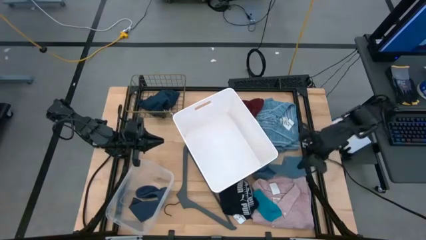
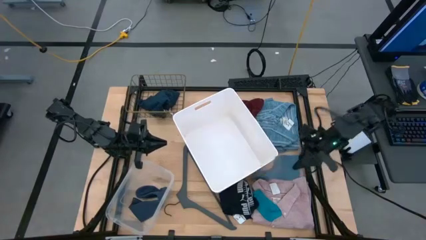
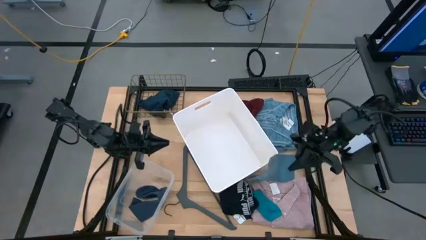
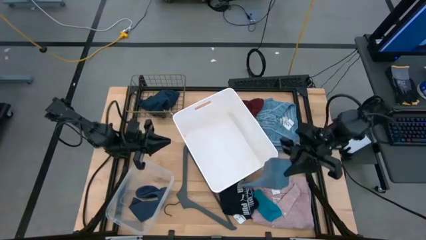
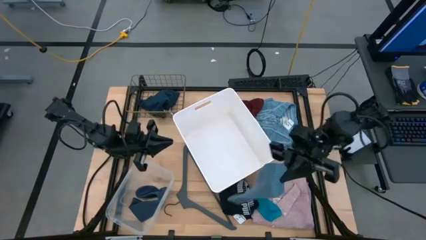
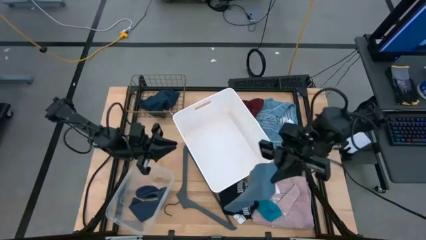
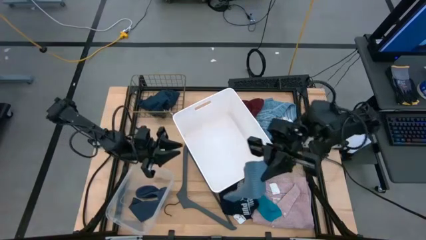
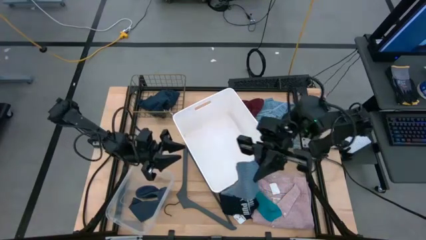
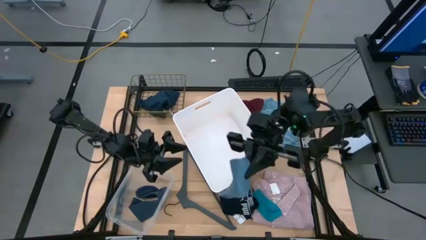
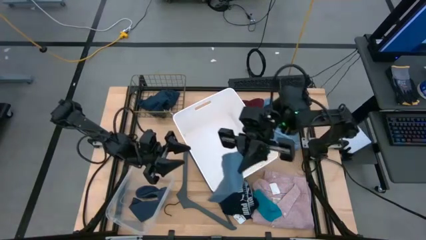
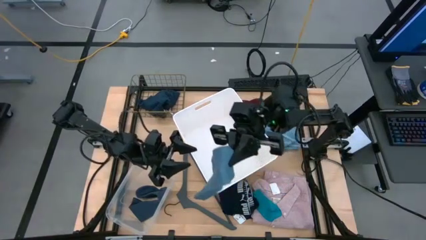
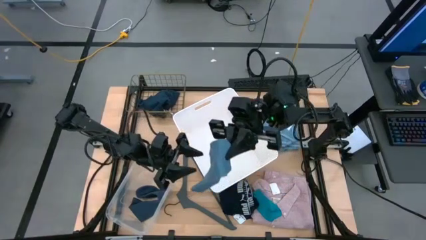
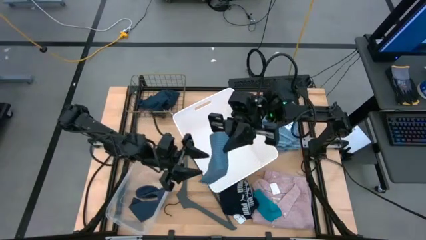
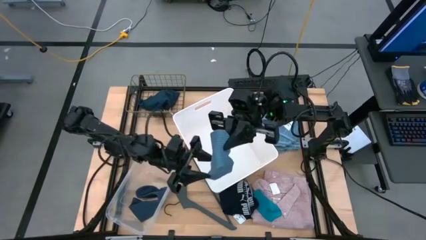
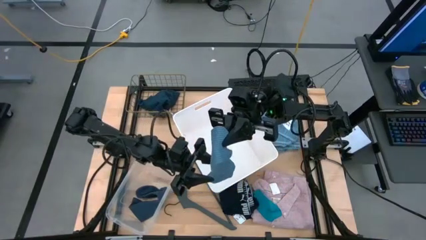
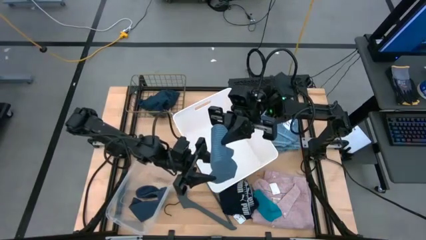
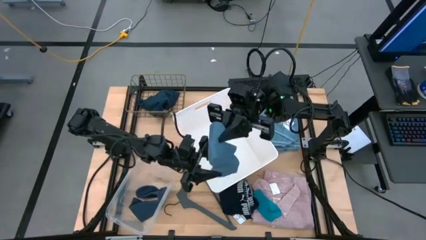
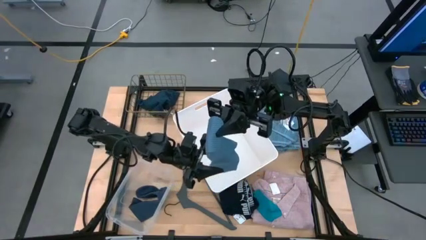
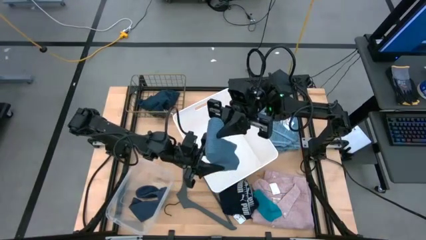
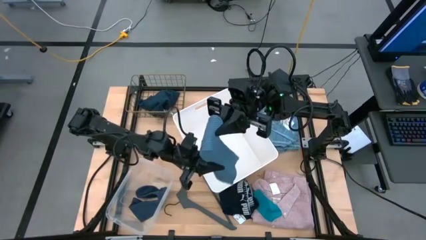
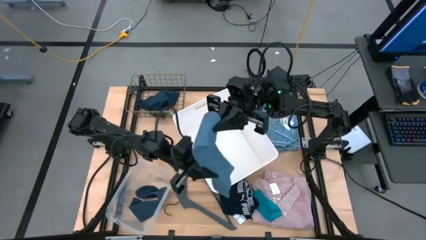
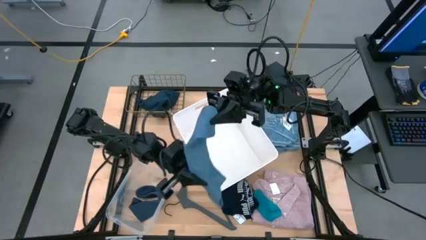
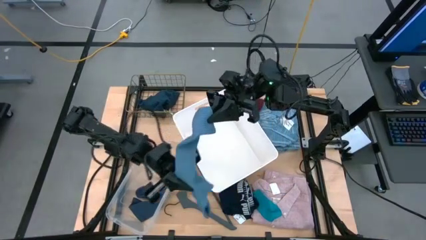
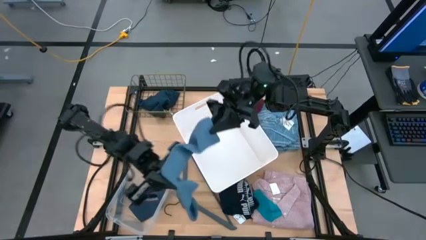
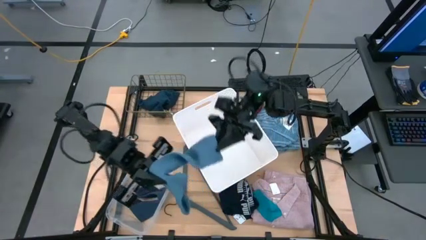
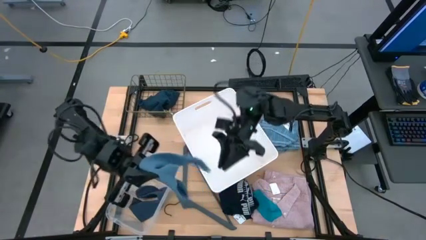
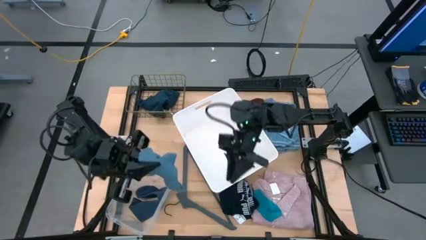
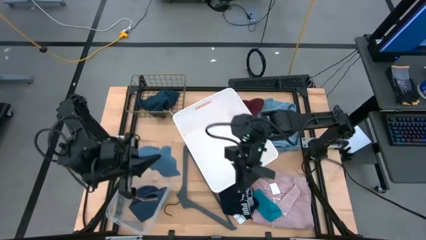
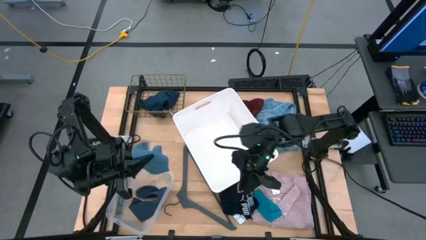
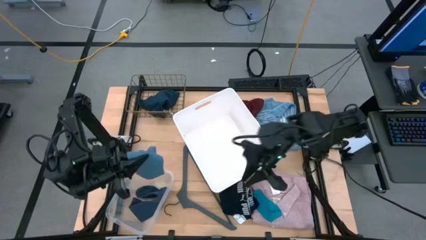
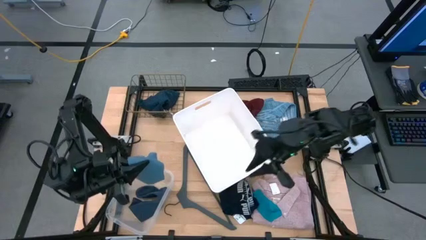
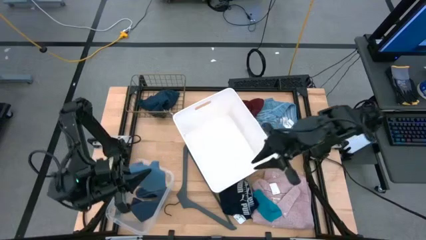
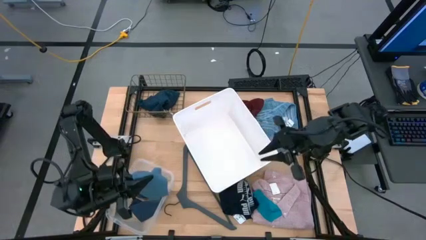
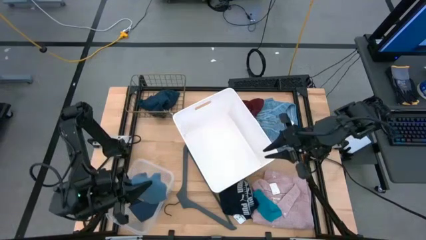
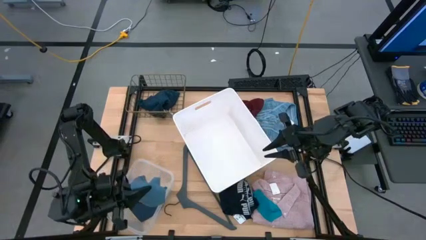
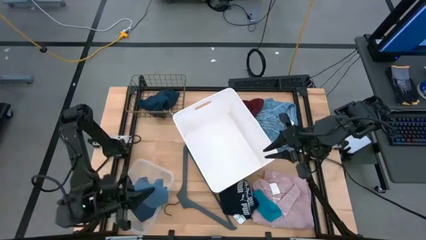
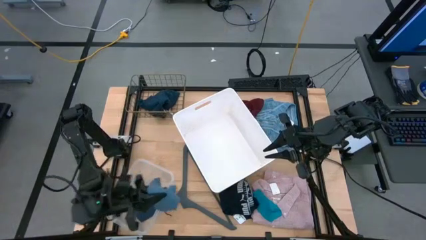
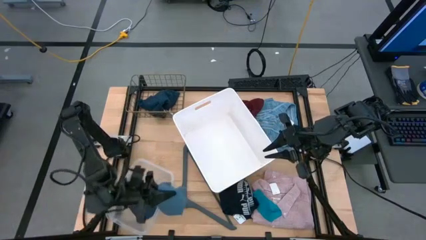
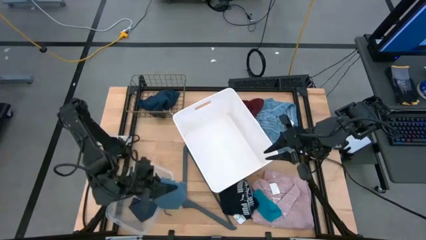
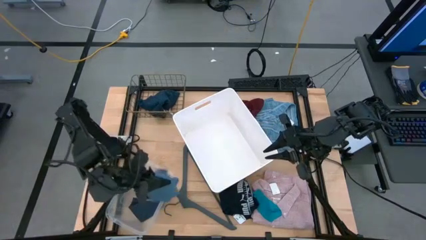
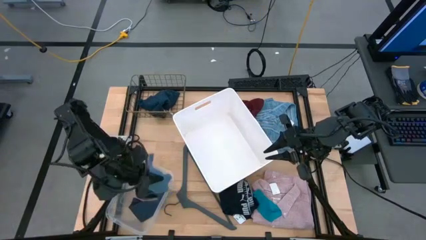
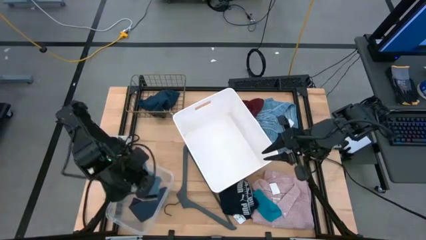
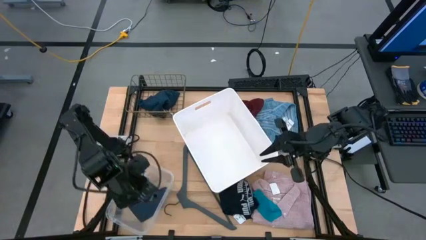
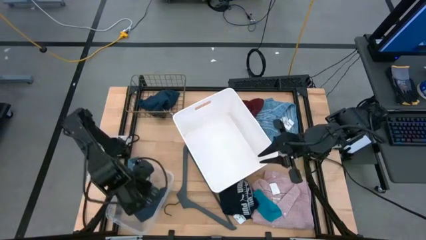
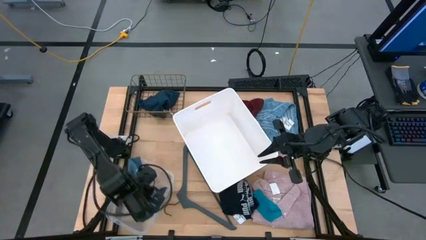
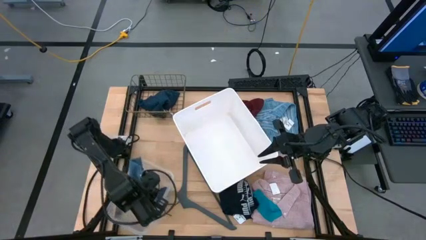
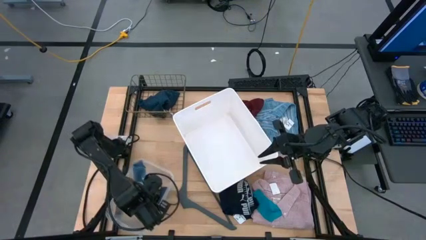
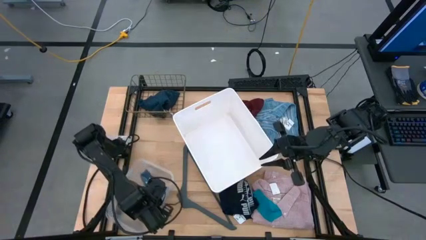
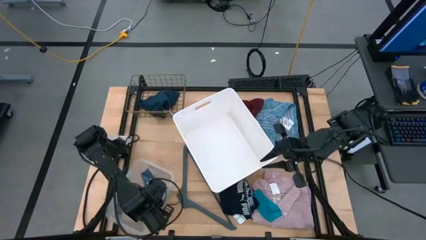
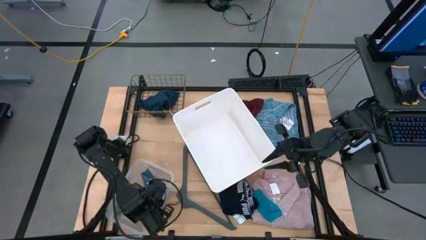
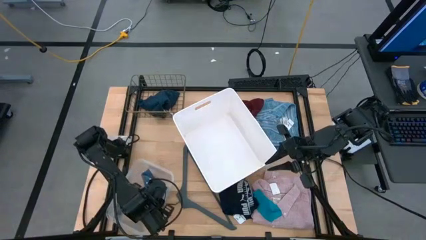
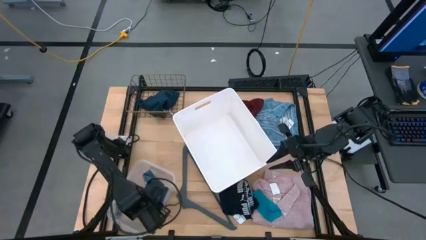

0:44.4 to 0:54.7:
Task: Pick & Place Cloths
Put the blue sock into the transparent bin

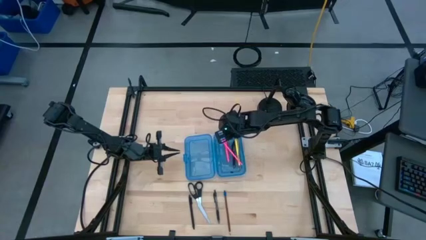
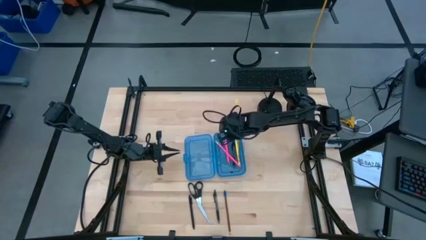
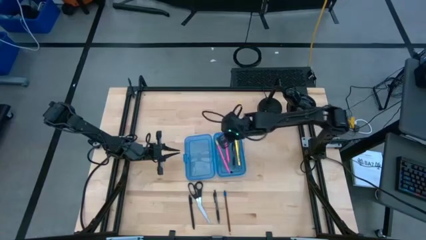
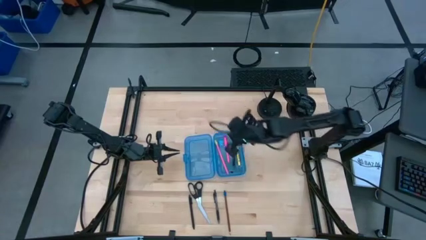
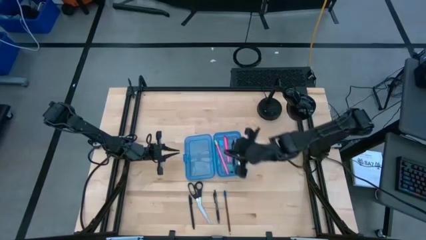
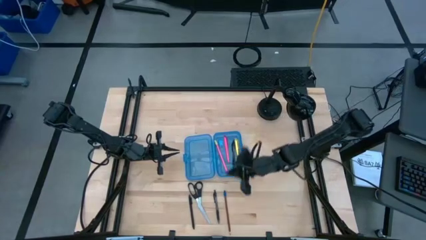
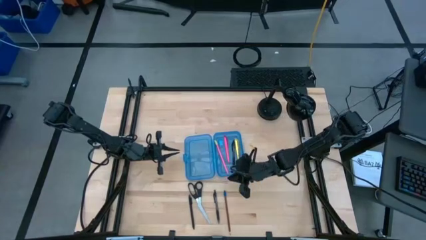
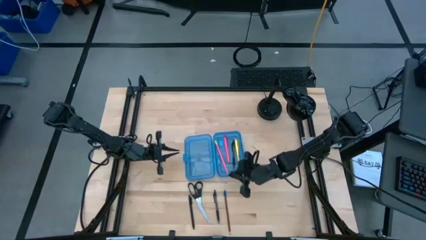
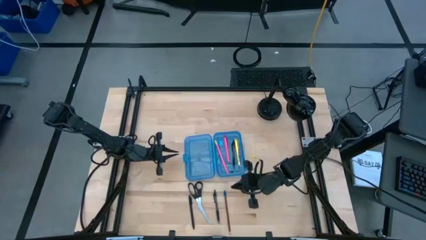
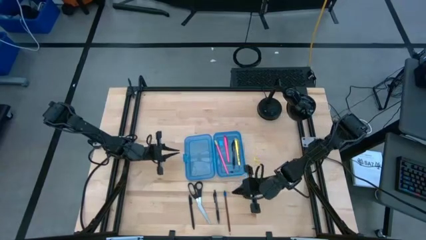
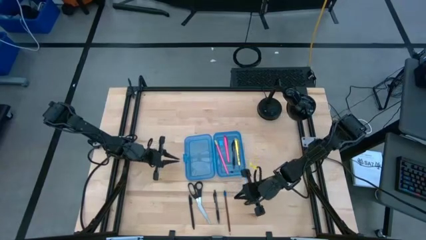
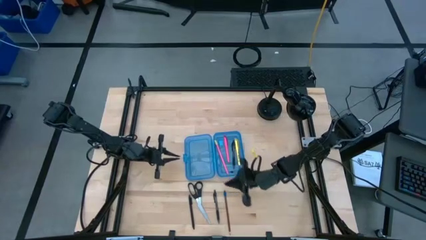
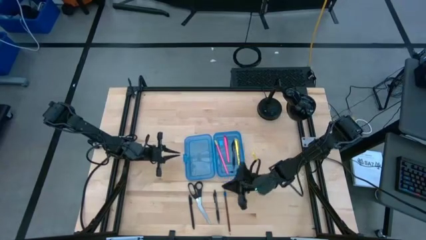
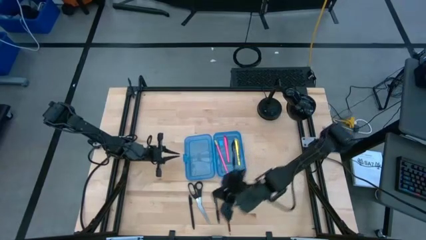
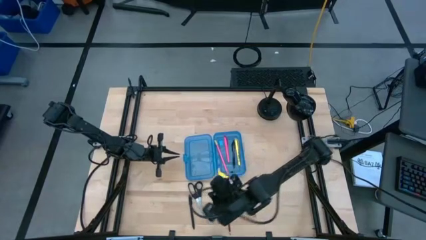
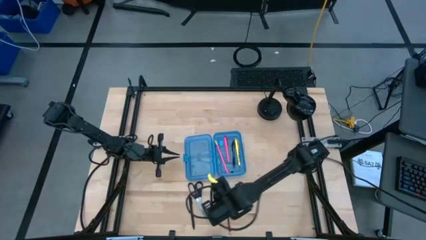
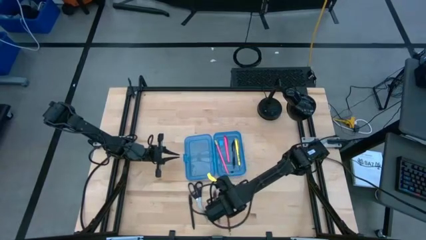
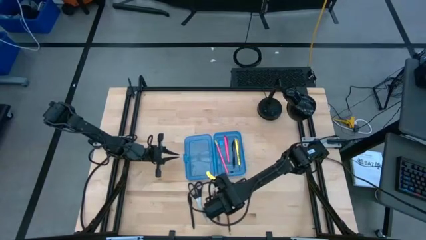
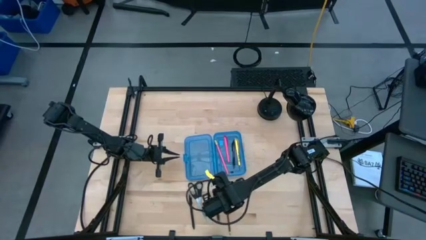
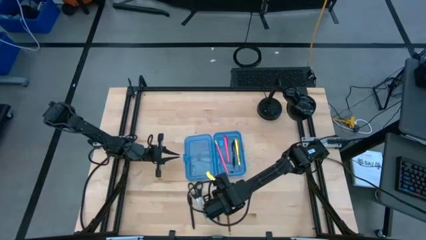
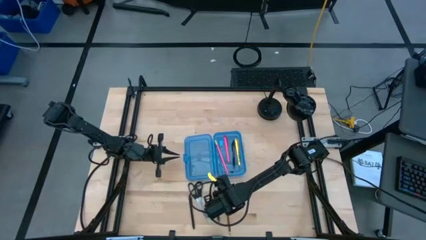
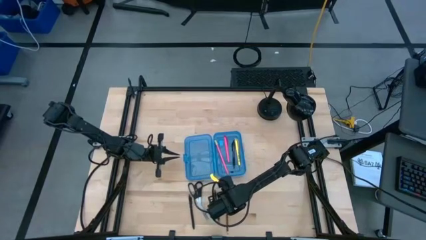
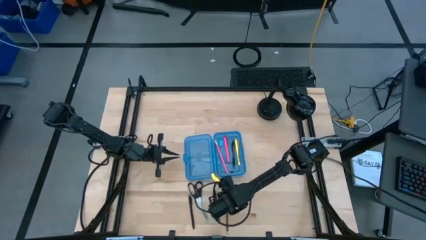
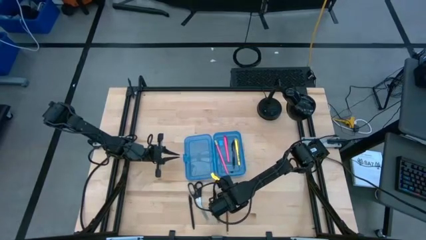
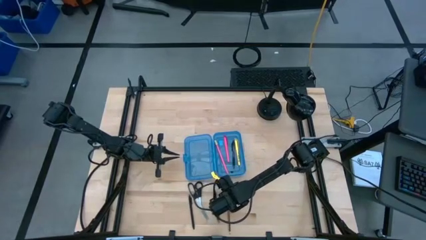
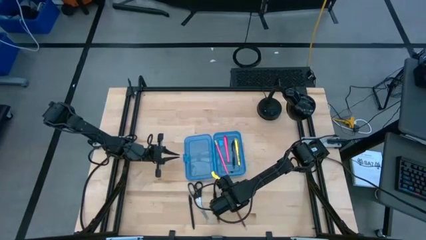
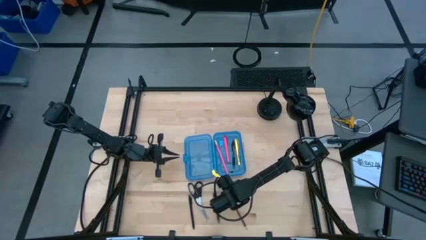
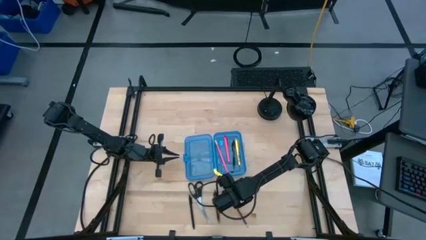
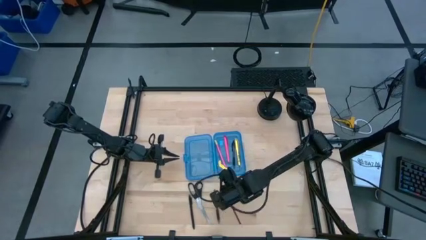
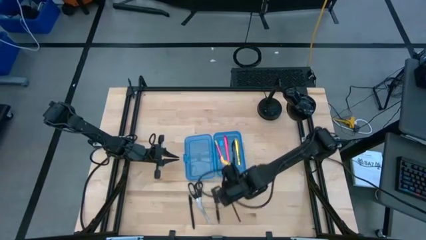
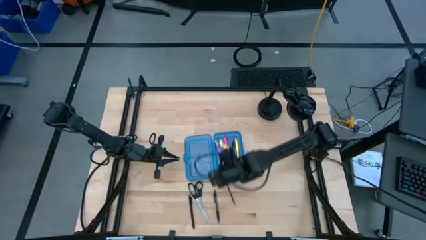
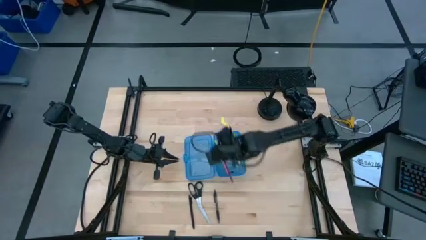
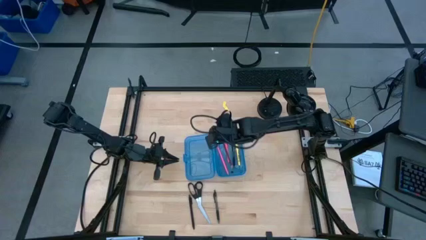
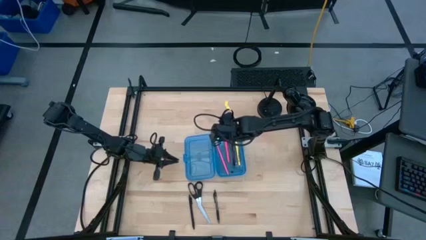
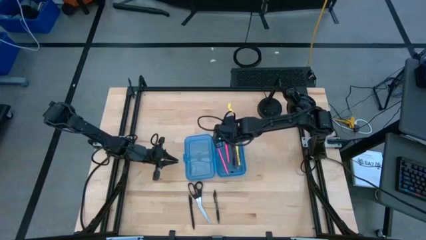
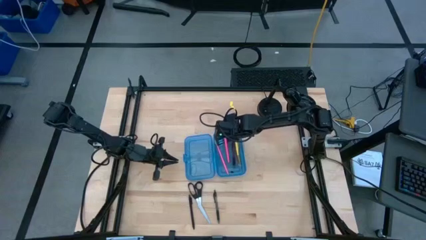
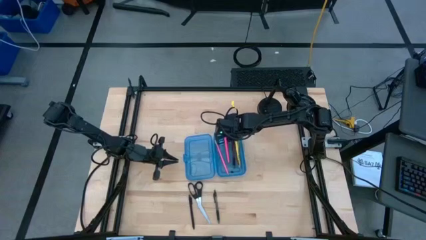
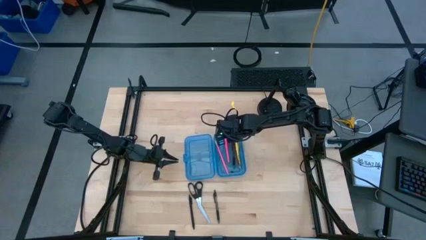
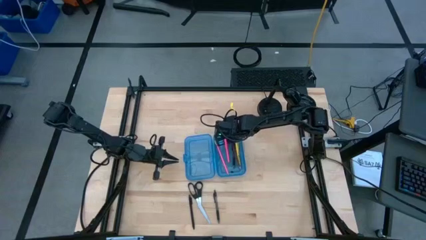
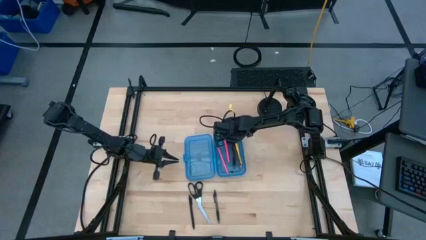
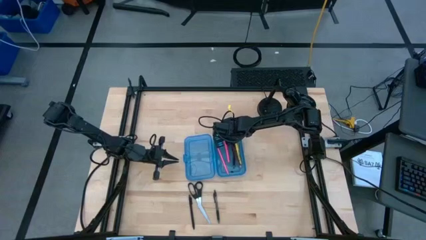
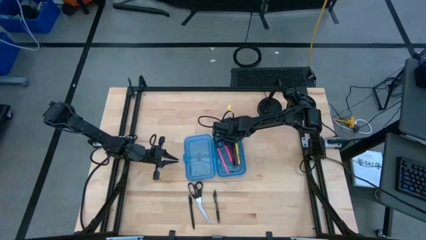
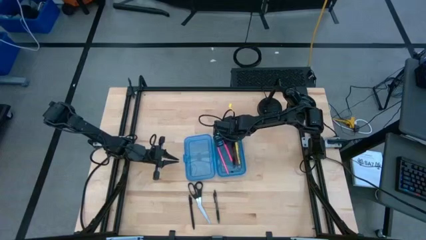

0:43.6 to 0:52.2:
Task: Pick & place school supplies into a supply box
Put the brown pencil into the blue supply box
